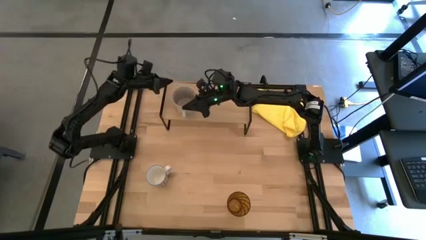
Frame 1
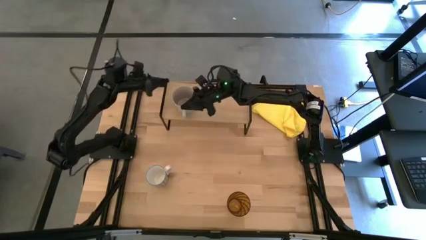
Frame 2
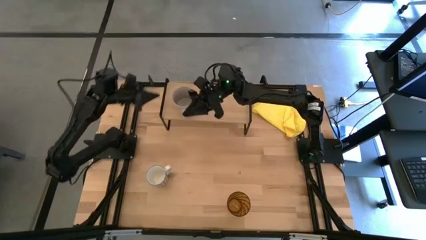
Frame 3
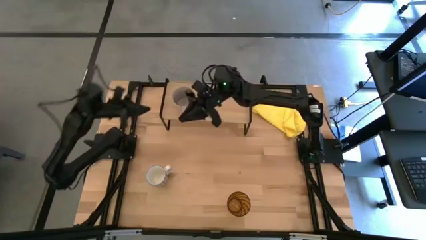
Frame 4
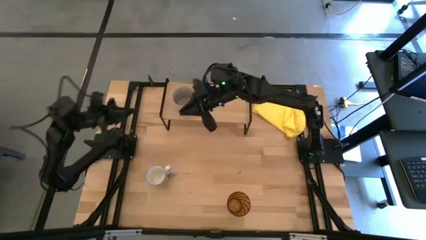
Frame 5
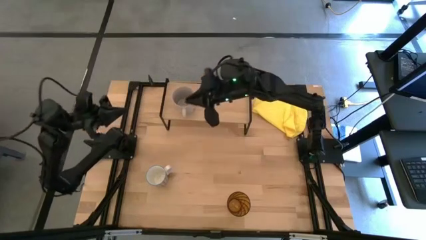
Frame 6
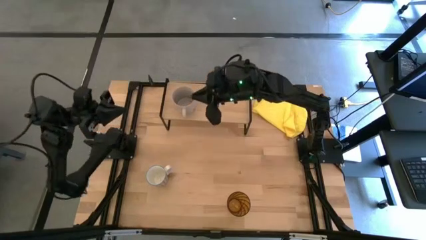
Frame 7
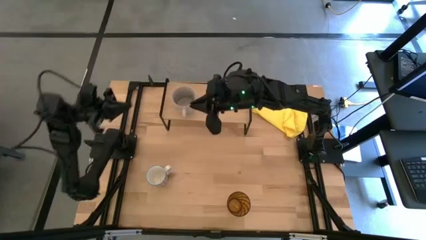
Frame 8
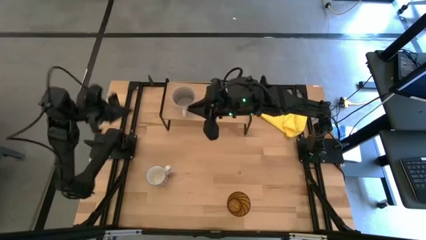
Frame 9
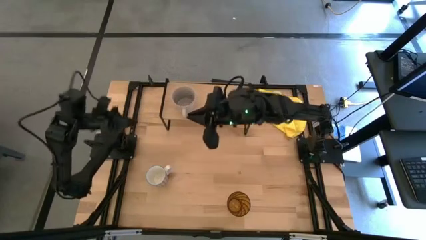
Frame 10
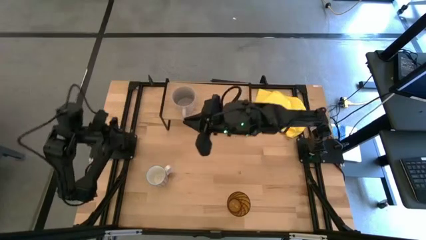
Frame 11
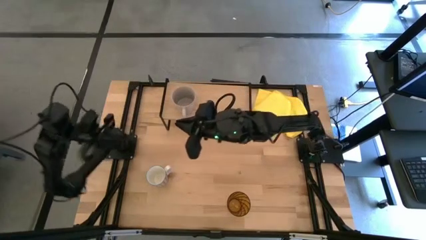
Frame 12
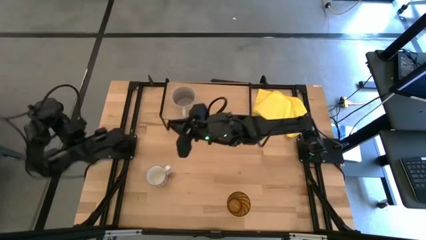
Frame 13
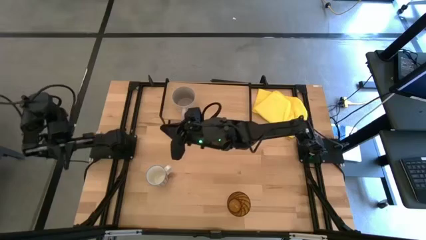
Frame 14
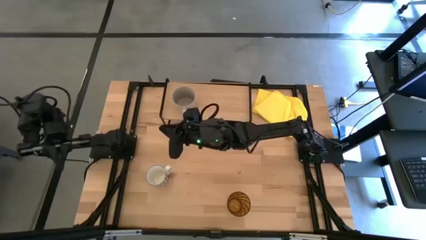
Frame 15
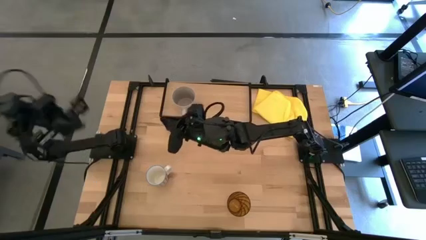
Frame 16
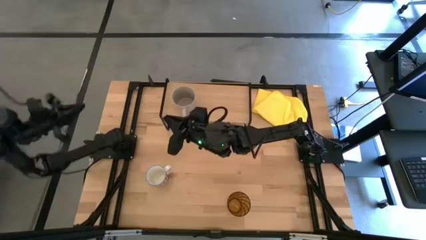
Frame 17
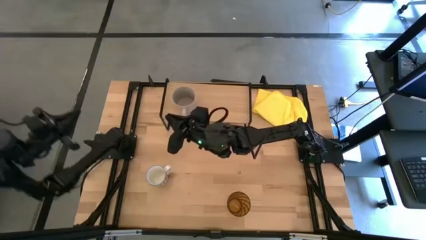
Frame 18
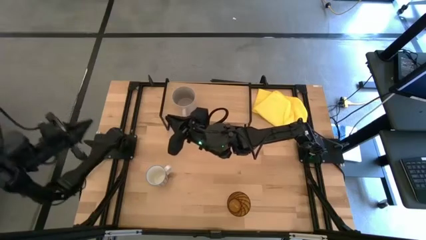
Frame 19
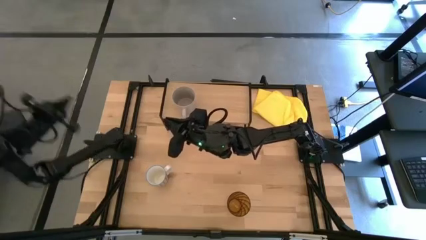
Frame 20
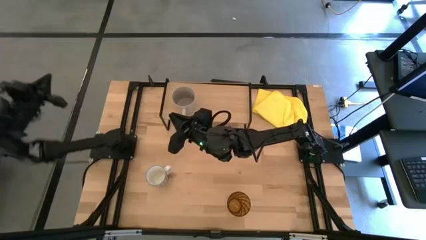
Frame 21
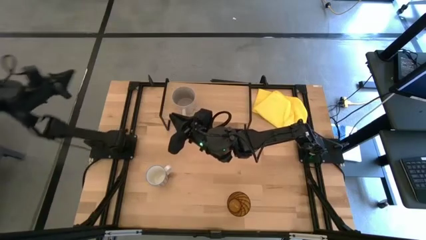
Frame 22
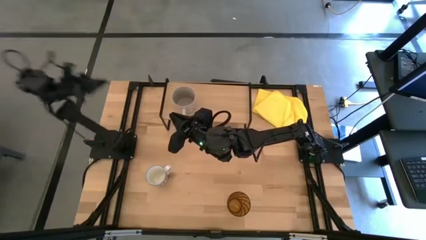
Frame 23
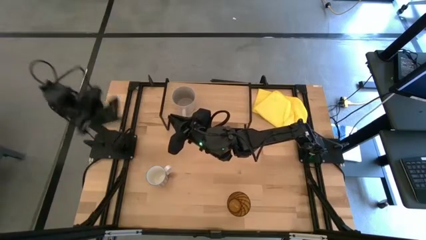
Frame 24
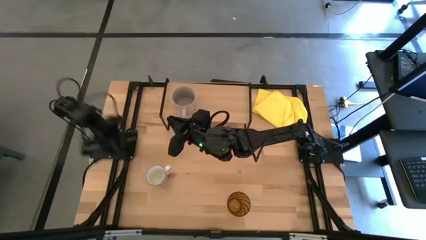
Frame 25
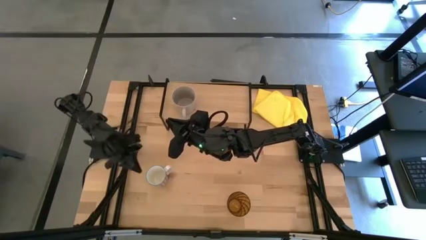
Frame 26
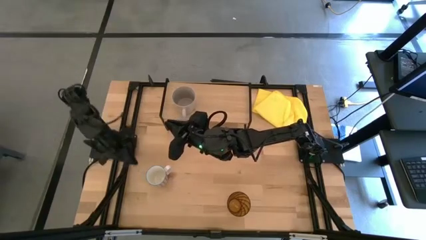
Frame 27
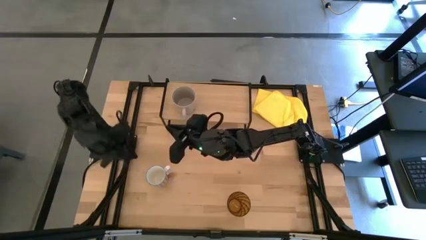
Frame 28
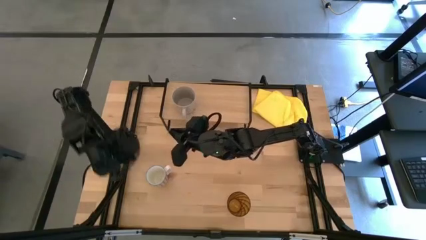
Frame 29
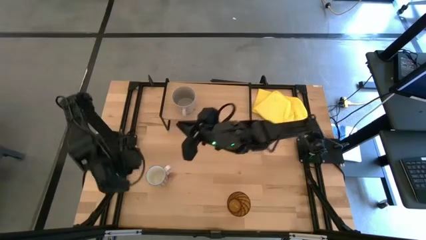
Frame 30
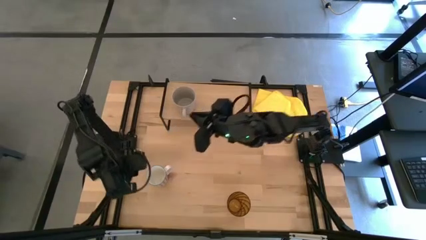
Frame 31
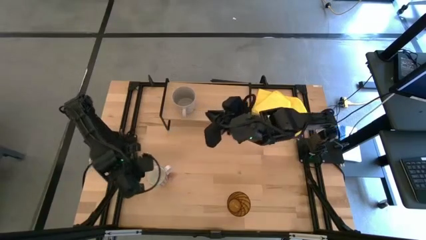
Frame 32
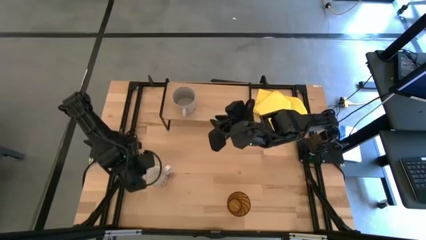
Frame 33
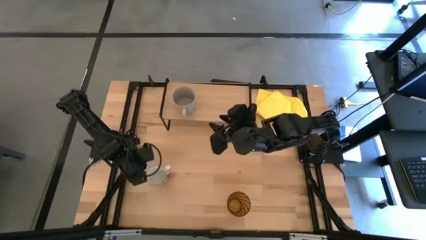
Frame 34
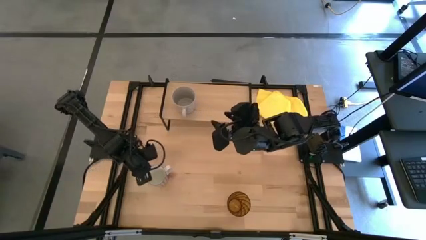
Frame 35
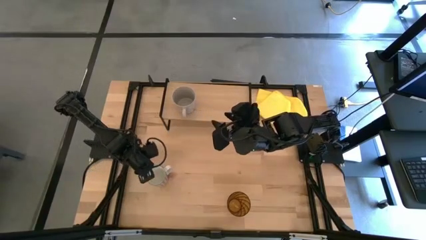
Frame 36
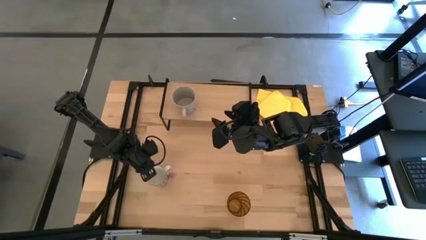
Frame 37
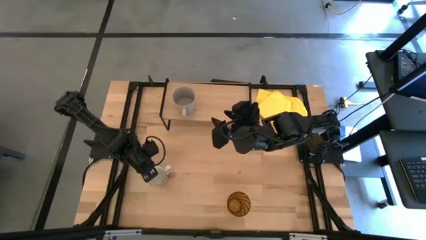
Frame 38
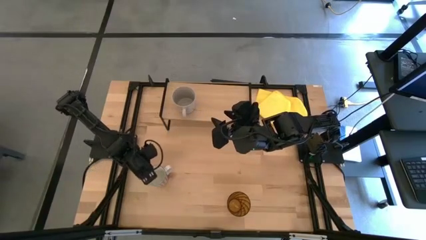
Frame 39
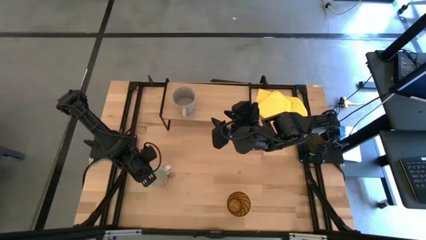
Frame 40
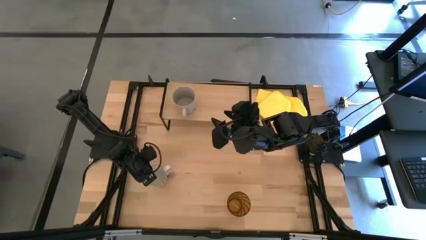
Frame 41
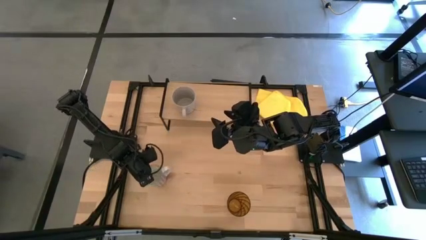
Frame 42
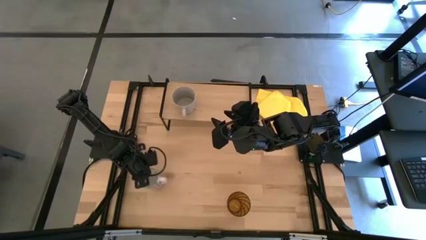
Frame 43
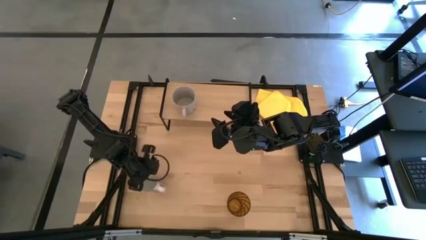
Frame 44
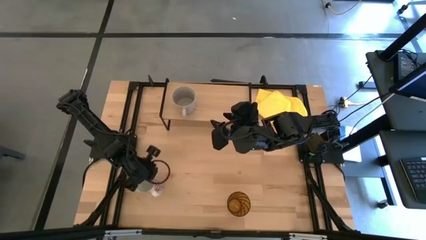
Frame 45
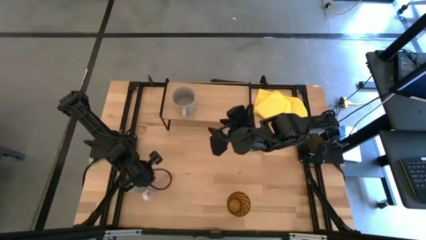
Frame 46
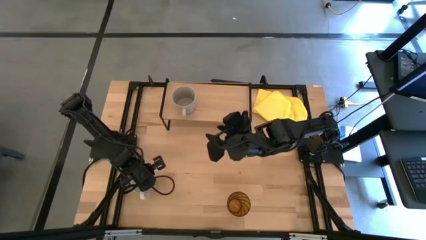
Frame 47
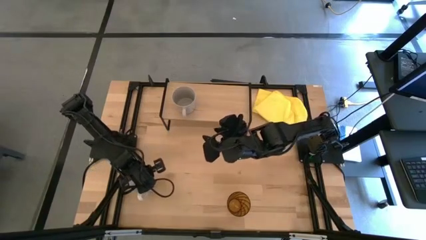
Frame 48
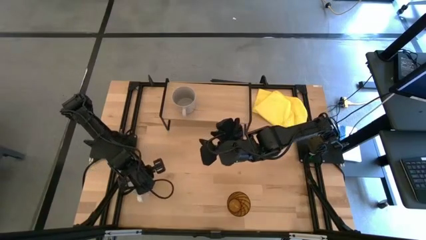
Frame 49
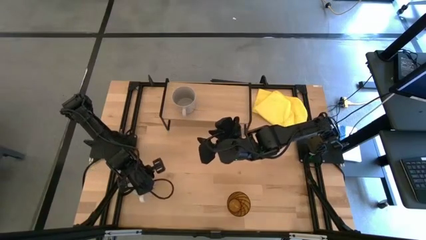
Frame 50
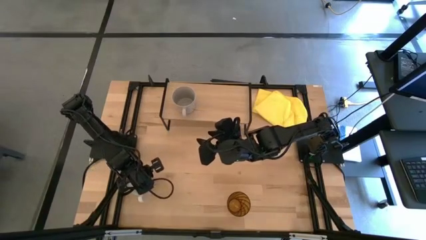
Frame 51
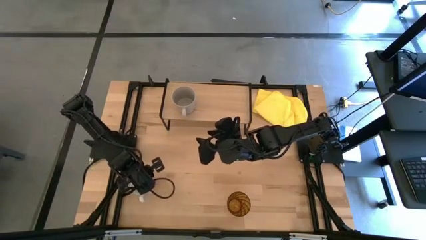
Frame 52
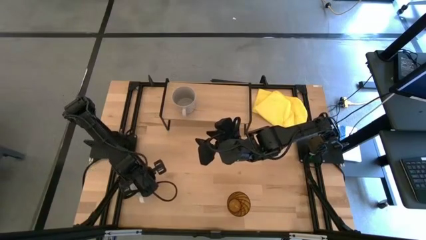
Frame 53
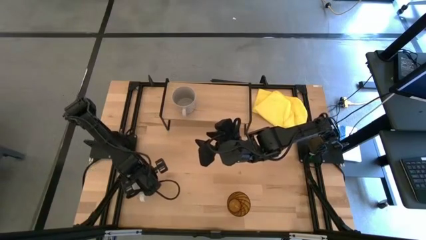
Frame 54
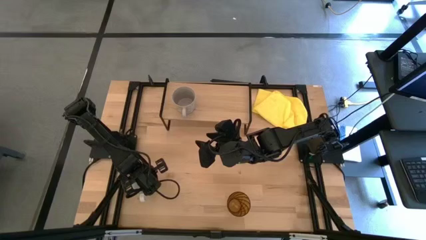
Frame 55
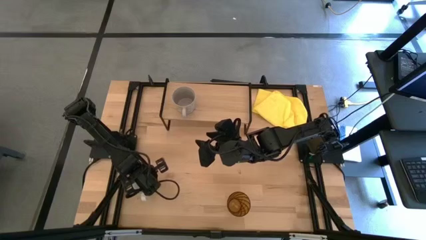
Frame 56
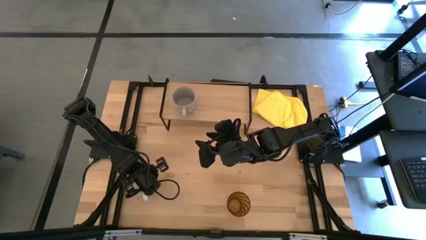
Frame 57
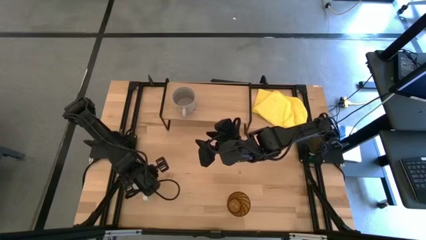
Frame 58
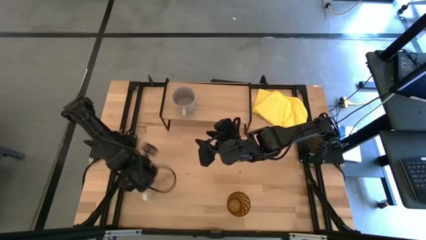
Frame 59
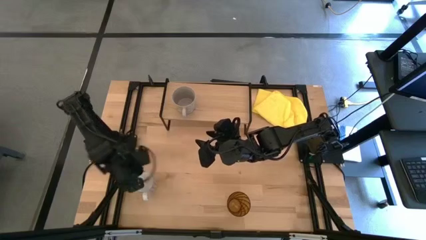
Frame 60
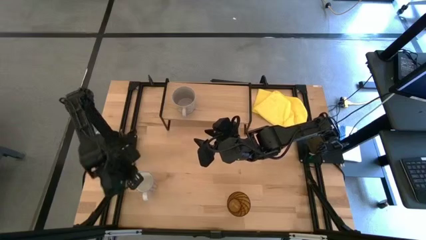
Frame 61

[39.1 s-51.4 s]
Task: Stack small to large cups/mugs on shelf
Put the red and white mug on the shelf
